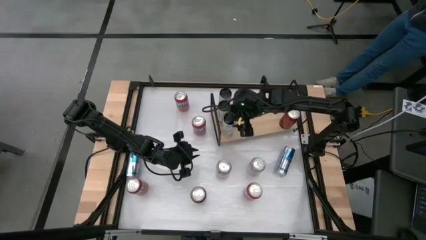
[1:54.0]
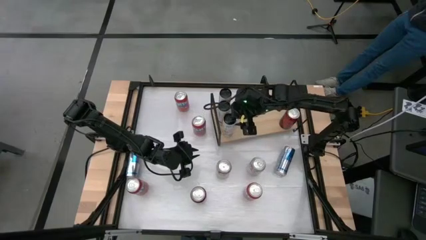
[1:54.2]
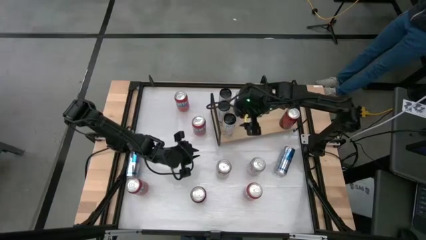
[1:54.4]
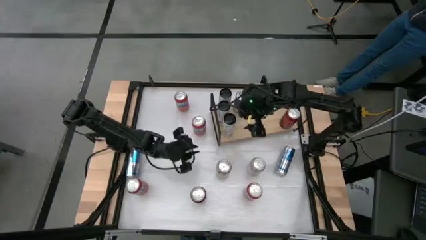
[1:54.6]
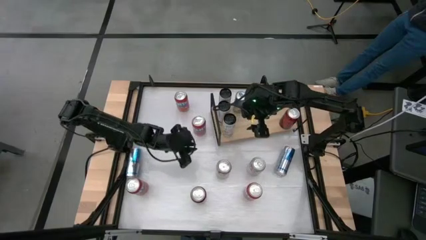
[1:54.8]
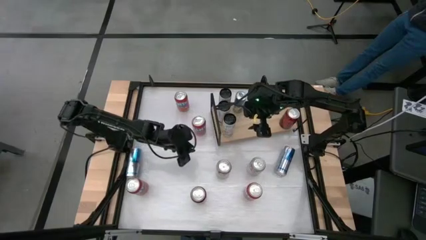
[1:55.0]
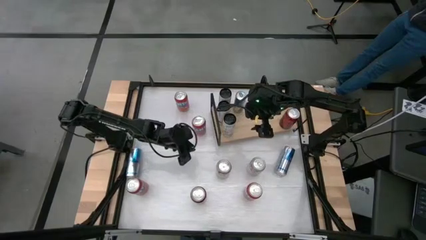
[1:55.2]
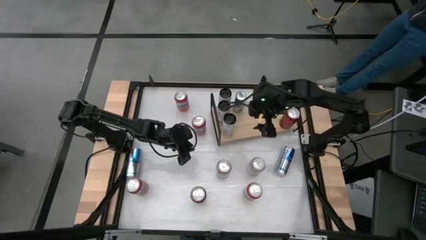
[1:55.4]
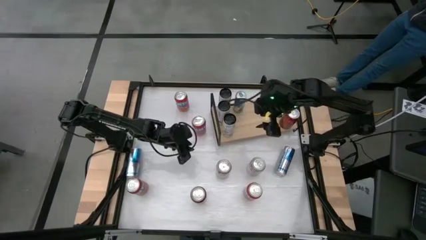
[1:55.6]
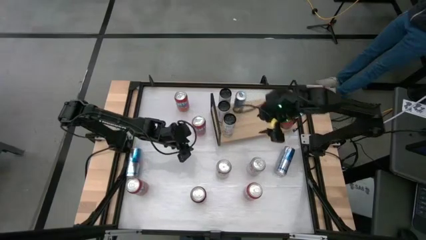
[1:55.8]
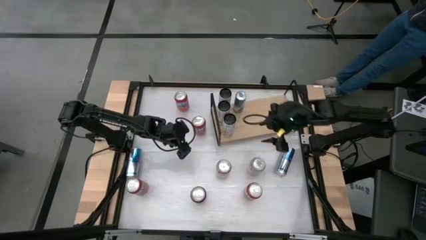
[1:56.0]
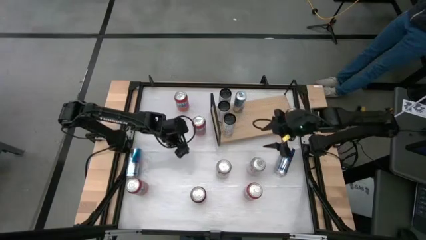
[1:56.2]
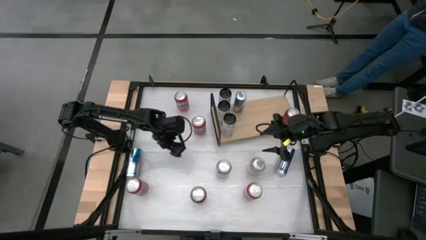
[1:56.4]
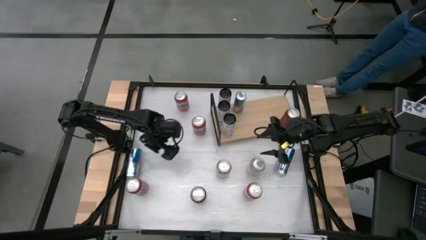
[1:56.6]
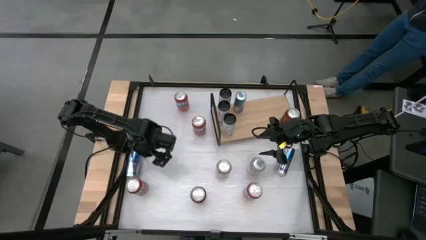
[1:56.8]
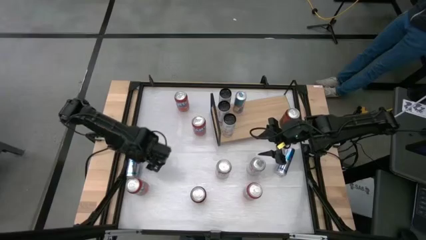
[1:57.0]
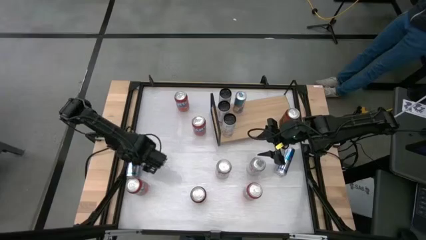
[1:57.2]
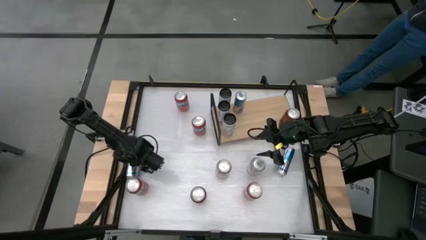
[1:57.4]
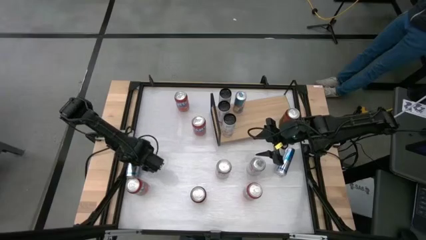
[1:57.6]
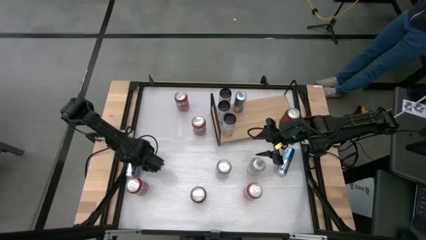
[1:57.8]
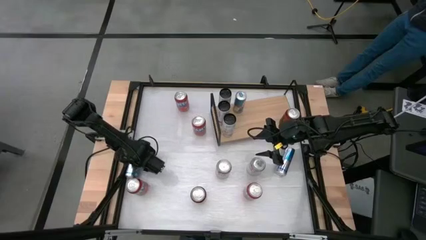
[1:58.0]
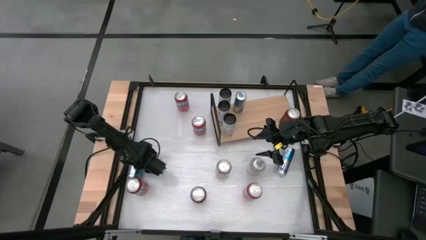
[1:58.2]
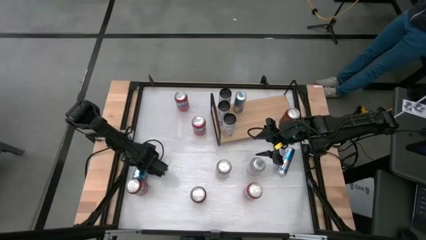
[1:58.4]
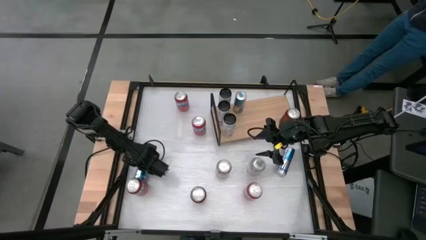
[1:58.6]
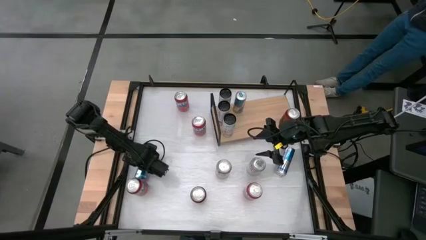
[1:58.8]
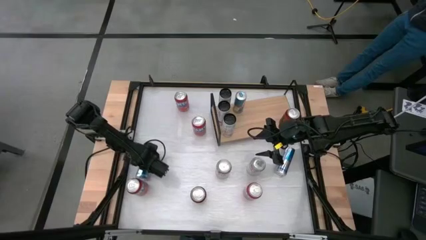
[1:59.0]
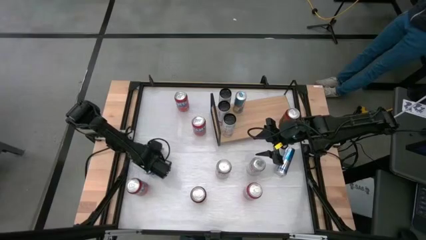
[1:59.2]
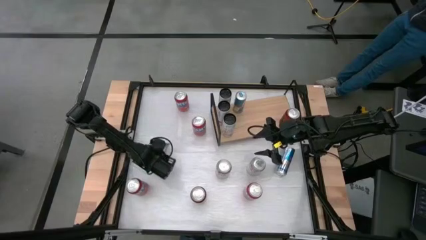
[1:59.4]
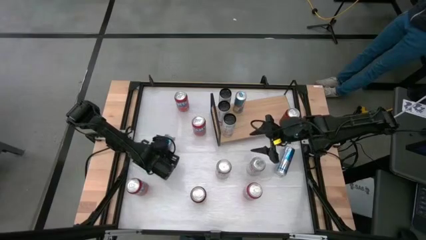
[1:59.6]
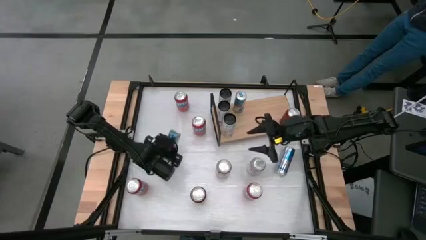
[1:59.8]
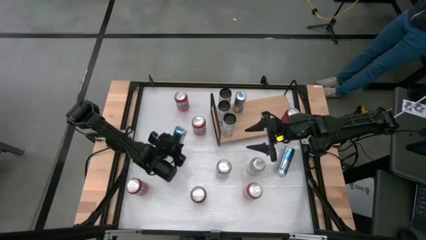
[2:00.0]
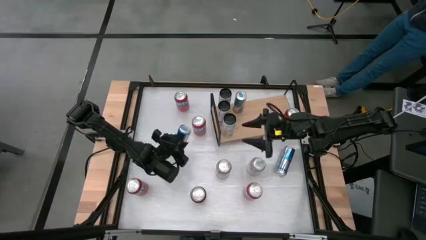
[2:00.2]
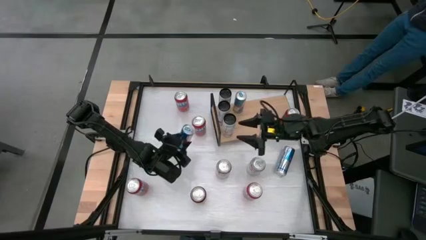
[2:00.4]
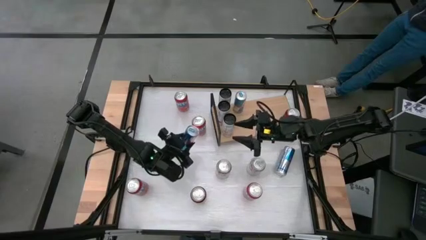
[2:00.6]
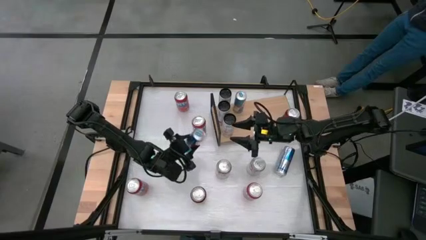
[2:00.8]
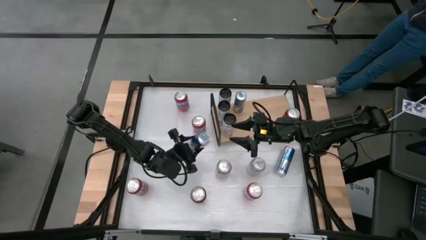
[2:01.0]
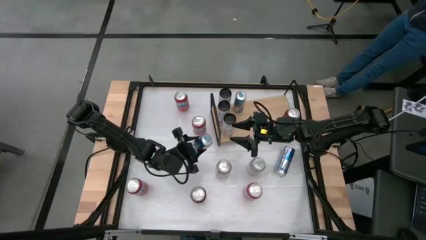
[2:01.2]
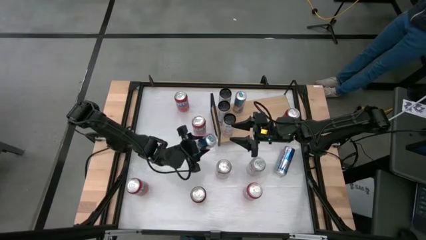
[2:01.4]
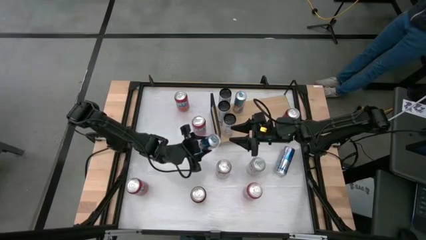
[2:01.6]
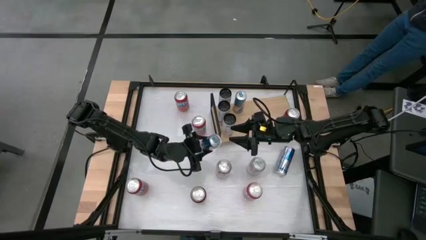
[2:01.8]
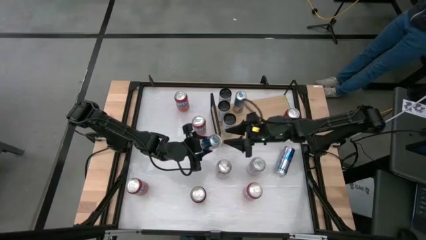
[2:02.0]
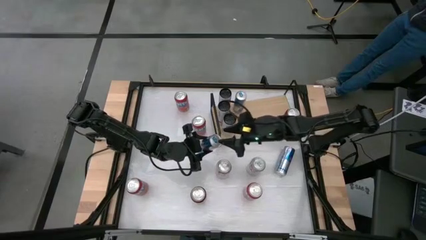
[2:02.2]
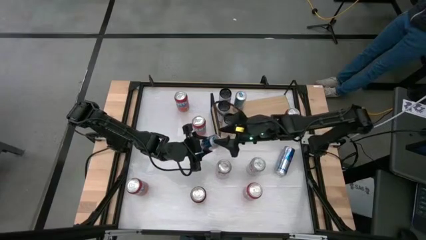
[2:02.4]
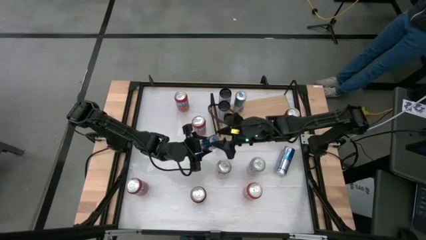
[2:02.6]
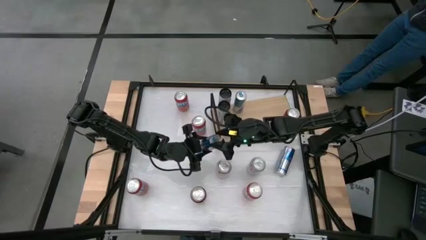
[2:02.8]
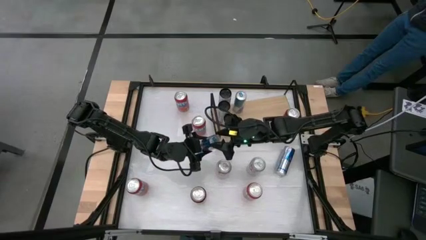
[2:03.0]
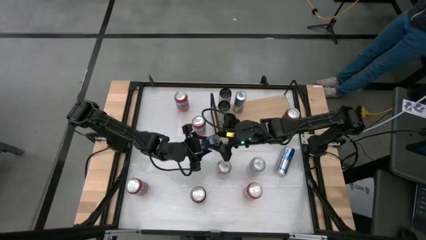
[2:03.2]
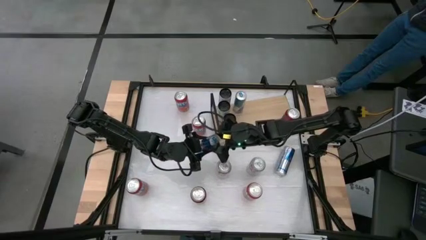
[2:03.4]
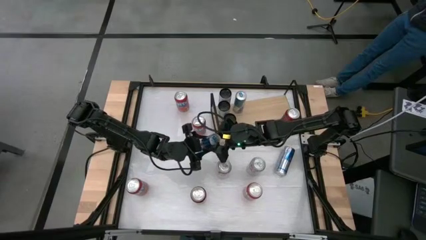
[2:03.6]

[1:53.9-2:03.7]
Task: Place canned beverage on shelf
Put the left blue white soda can on the shelf aligned with the other blue white soda can

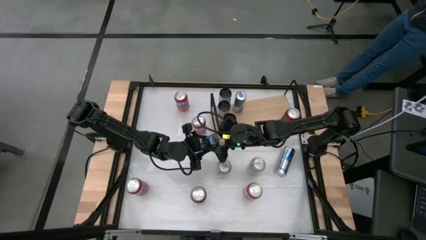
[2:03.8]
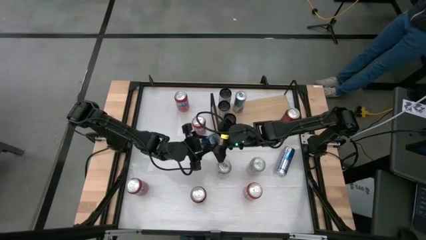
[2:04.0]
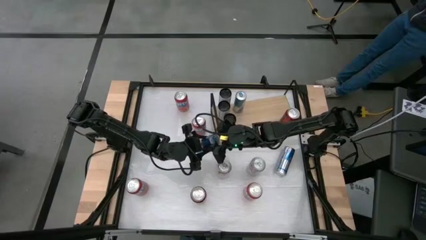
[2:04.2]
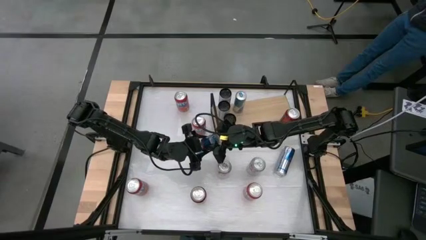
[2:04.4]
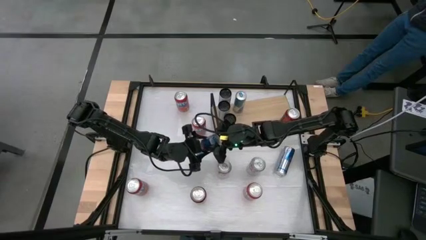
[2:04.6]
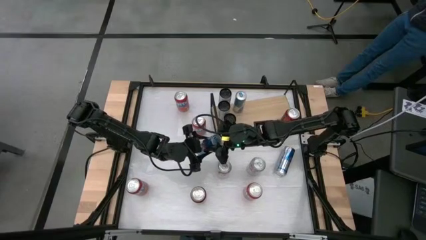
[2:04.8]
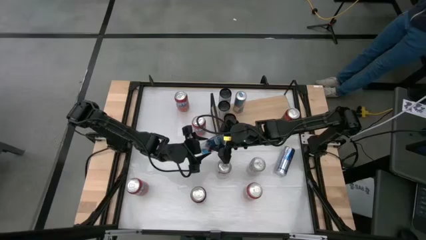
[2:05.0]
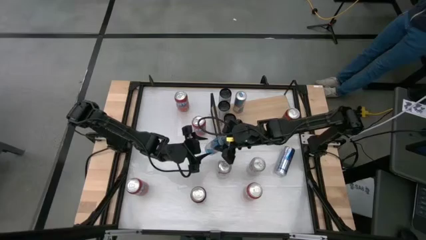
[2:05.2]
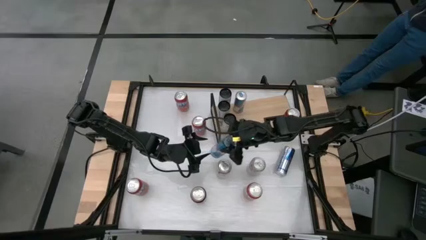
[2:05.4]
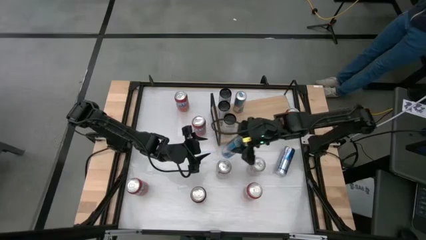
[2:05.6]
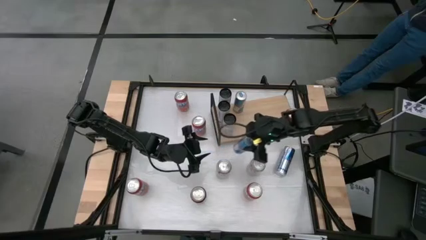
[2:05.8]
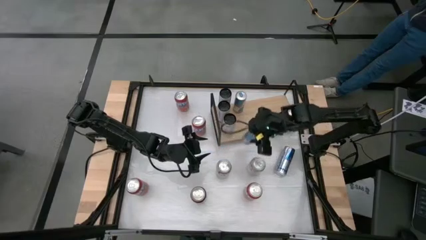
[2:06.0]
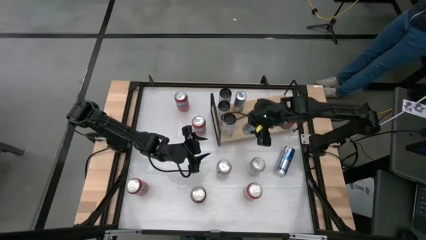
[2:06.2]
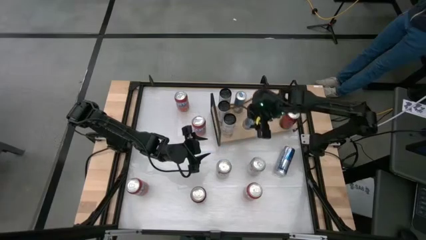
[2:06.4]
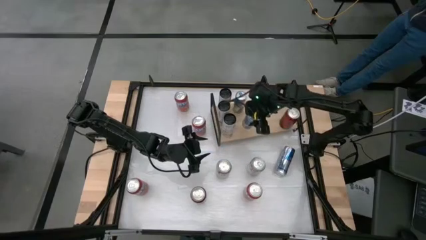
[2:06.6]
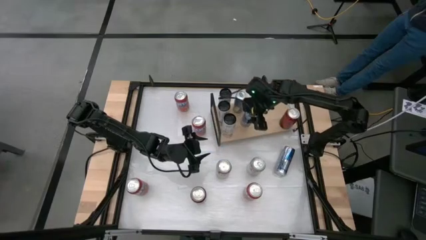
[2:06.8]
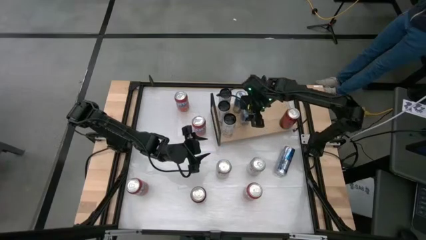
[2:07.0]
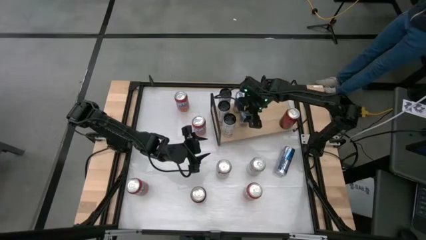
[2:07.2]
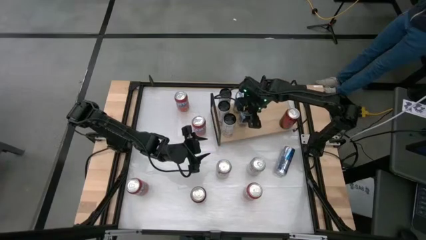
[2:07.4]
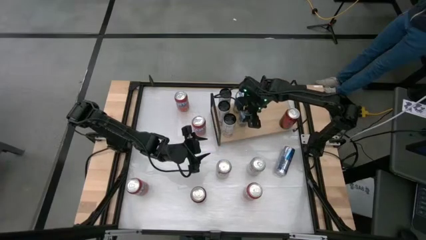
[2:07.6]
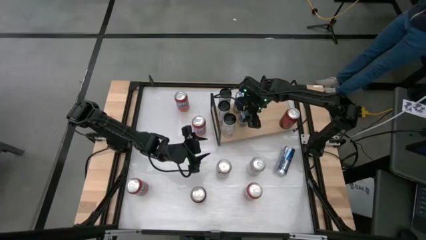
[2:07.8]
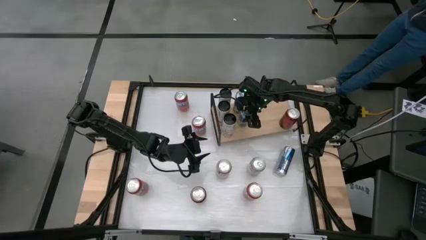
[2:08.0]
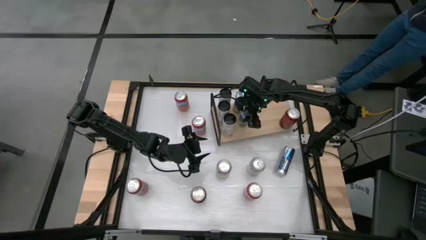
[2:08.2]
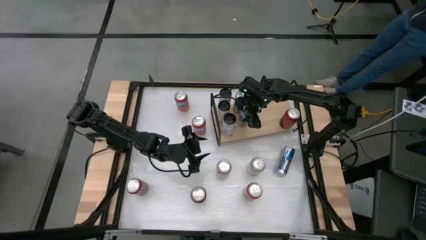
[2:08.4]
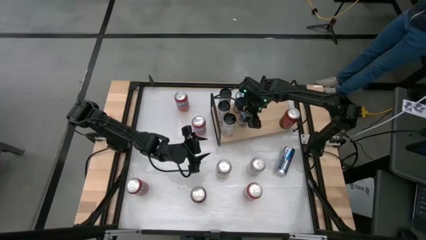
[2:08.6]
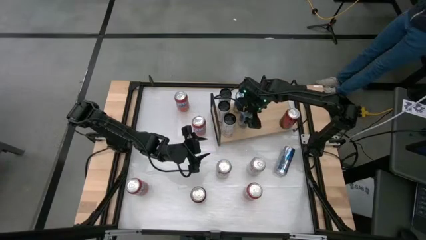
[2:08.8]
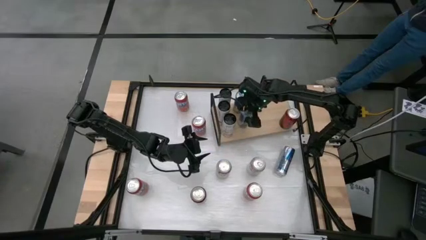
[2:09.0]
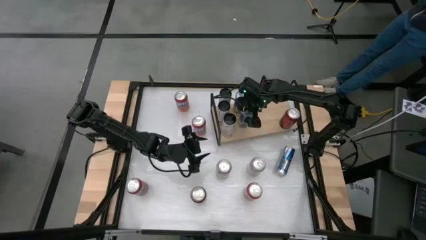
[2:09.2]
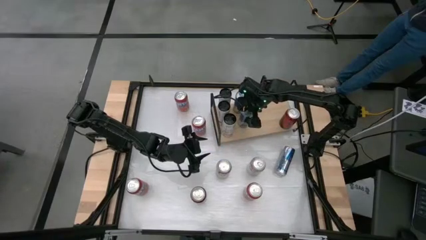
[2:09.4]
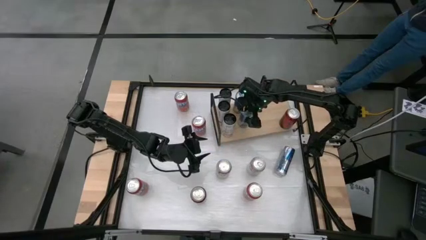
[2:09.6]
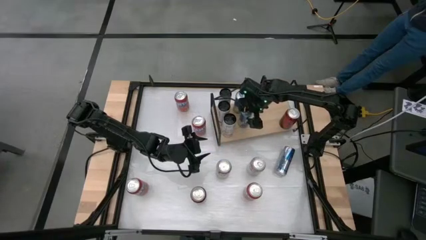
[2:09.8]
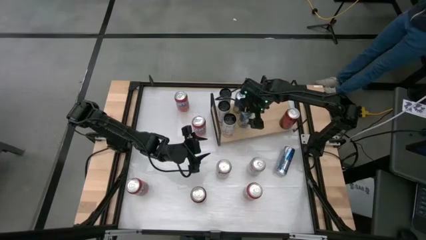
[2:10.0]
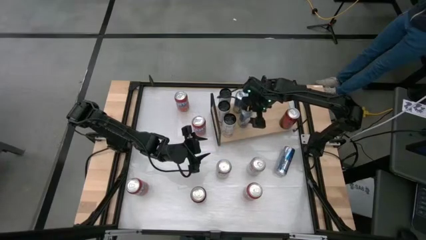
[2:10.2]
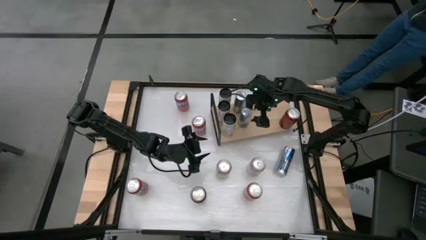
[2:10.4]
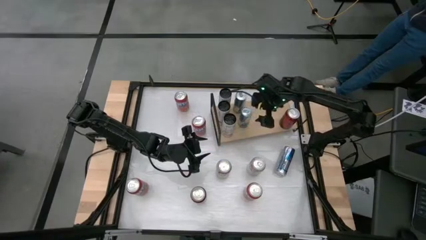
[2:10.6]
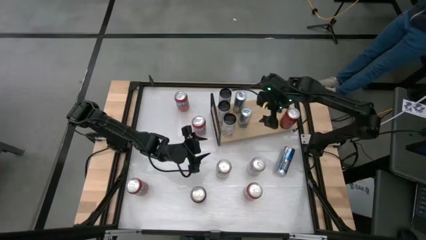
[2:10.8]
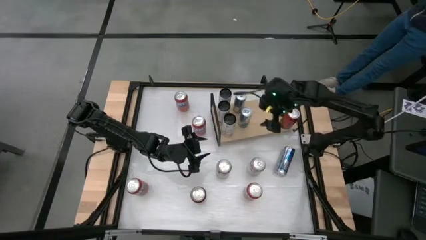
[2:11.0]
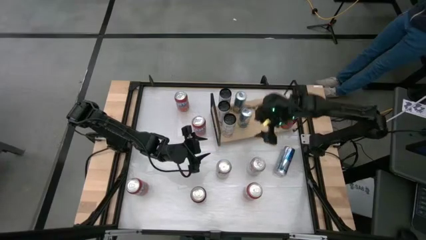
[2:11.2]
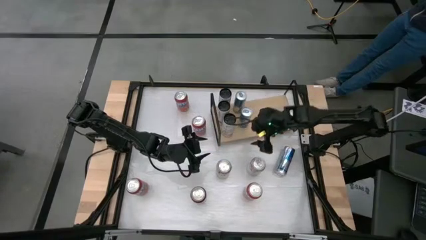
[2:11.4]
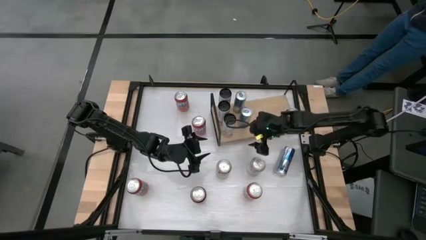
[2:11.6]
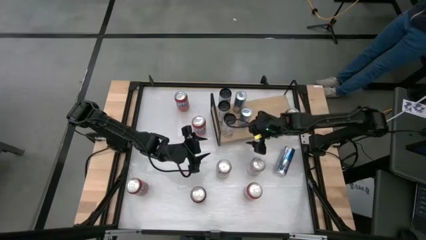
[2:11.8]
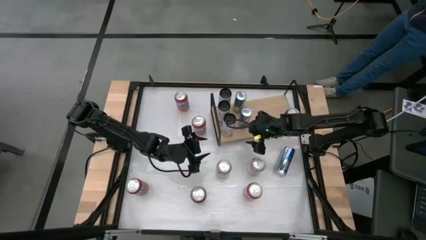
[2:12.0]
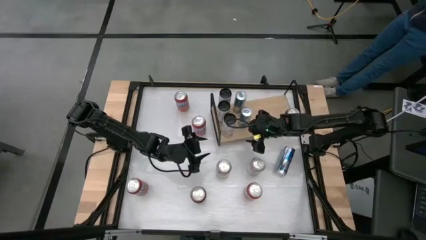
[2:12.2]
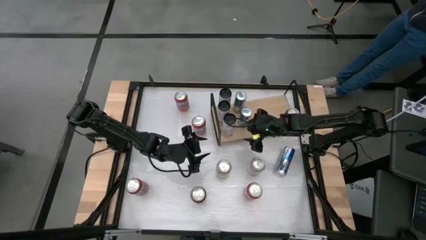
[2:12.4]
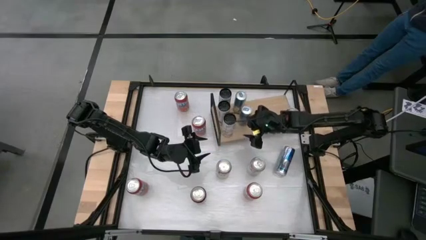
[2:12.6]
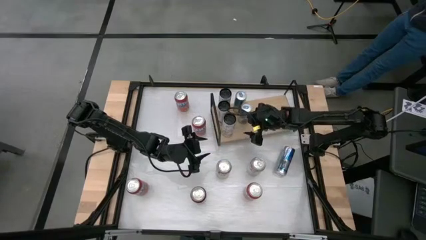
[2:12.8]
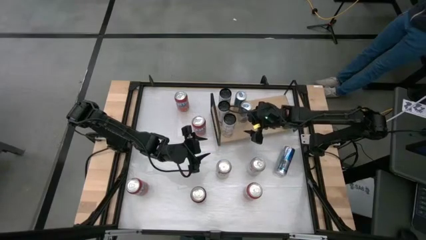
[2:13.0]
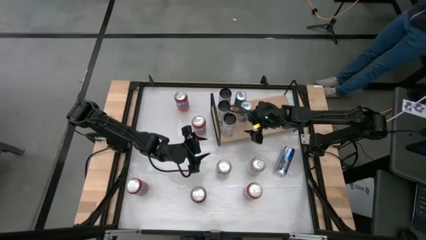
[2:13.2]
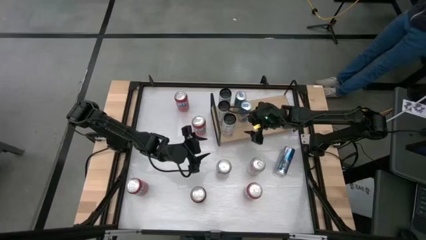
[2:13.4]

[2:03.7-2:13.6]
Put the left blue white soda can on the shelf aligned with the other blue white soda can
